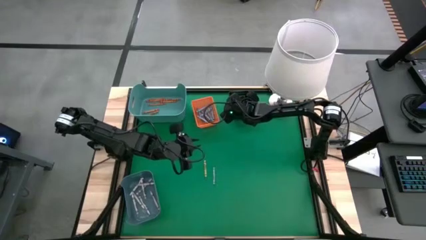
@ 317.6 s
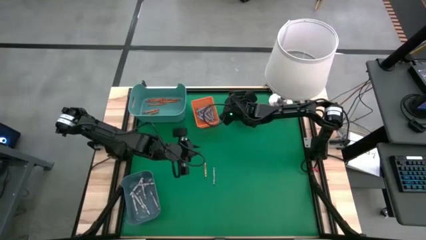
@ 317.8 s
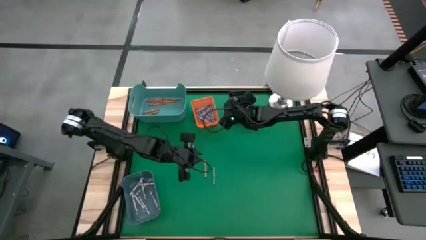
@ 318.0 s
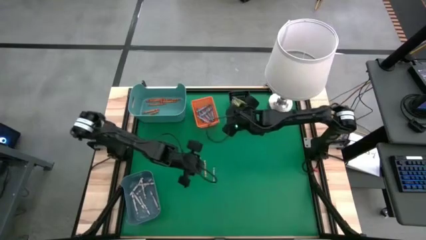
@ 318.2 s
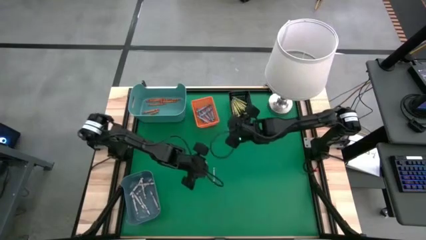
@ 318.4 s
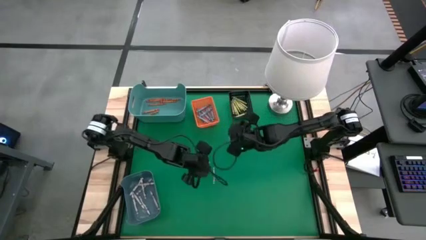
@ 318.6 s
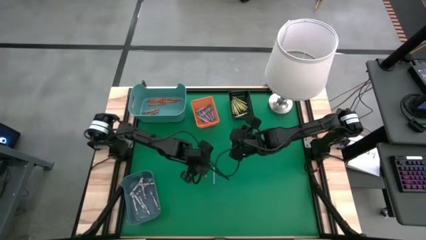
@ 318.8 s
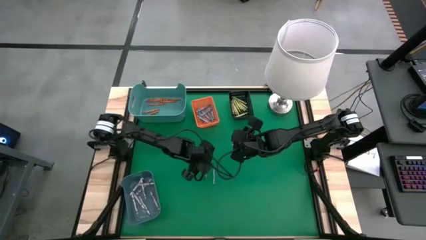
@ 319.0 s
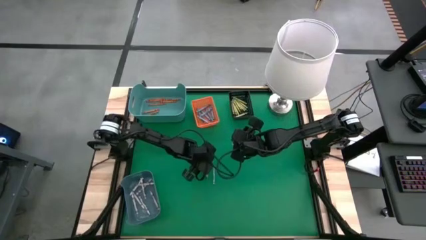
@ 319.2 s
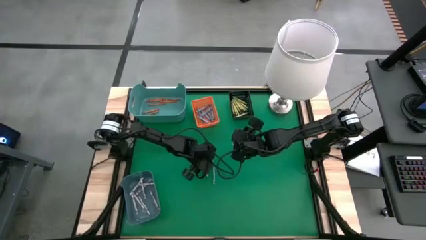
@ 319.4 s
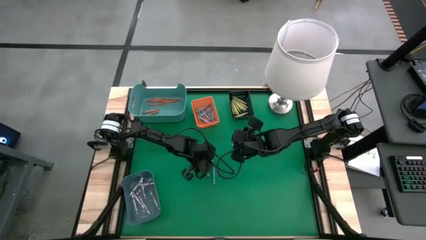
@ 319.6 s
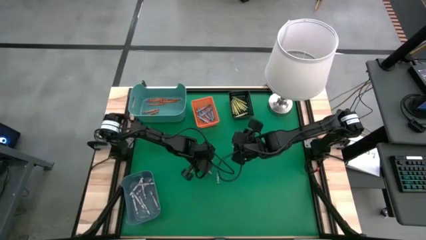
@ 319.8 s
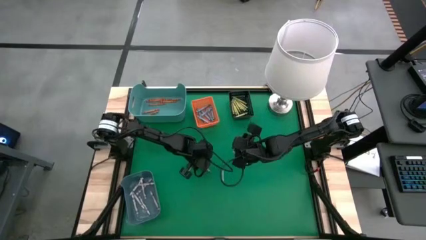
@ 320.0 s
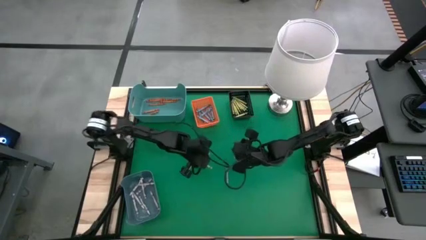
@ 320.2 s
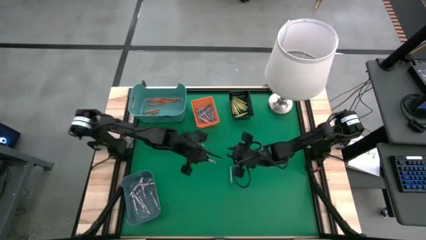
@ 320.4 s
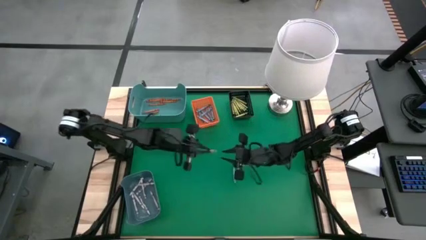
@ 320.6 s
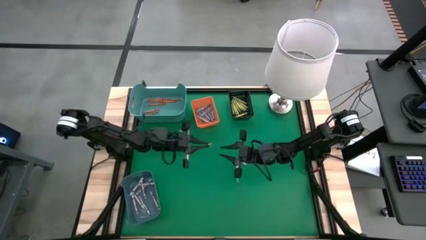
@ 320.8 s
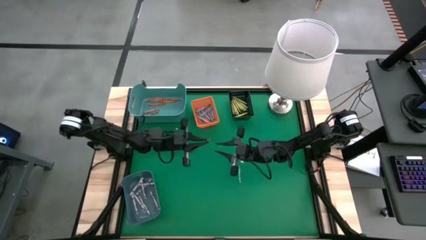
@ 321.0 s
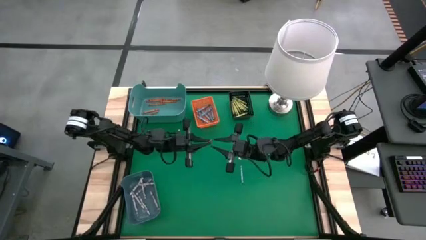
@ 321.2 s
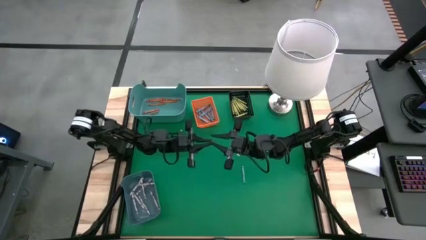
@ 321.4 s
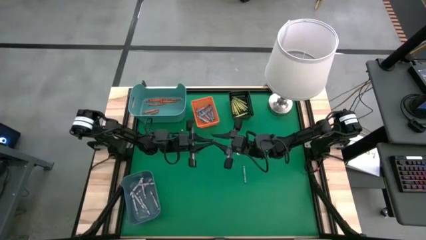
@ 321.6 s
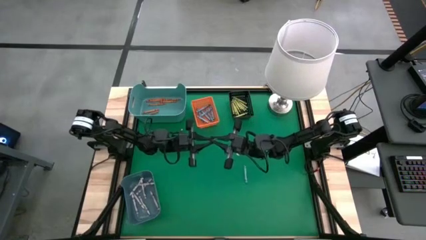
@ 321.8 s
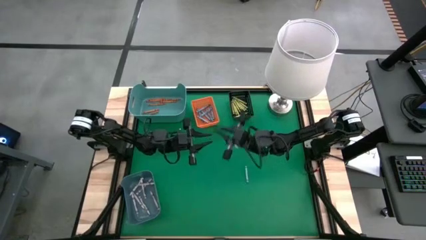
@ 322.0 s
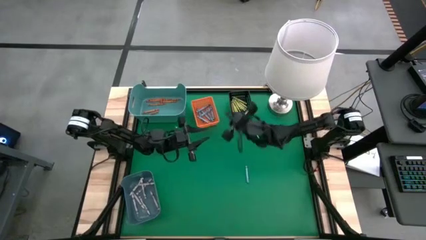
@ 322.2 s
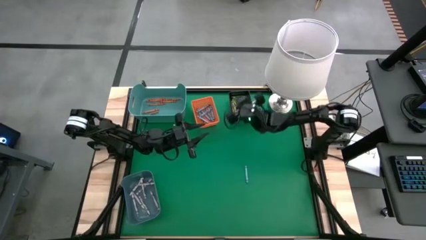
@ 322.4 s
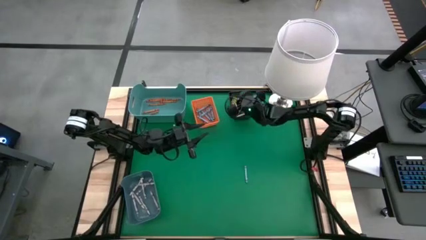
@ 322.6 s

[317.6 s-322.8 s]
Task: Sort crayons
Put the green crayon into the black bin

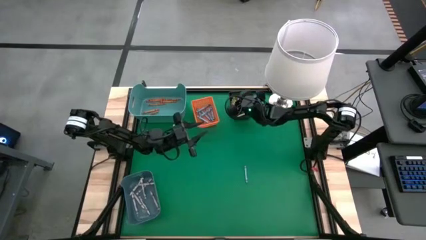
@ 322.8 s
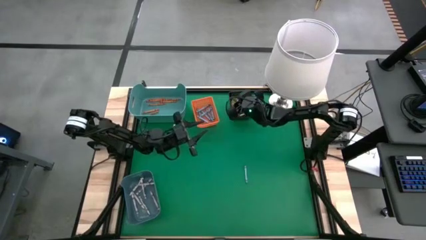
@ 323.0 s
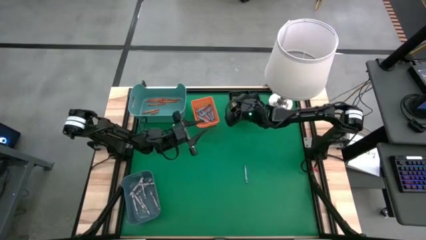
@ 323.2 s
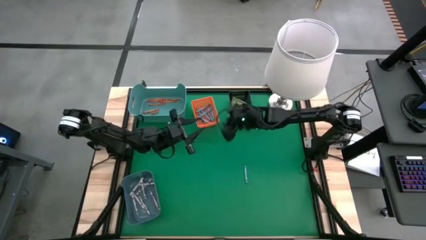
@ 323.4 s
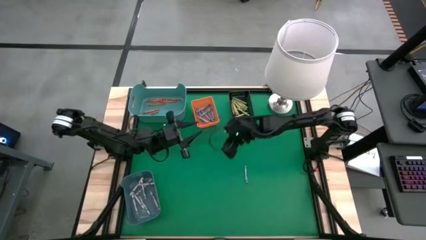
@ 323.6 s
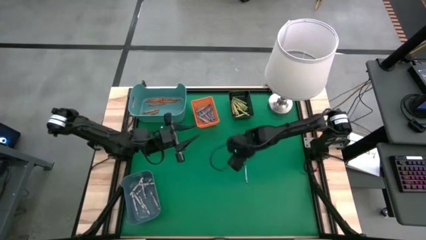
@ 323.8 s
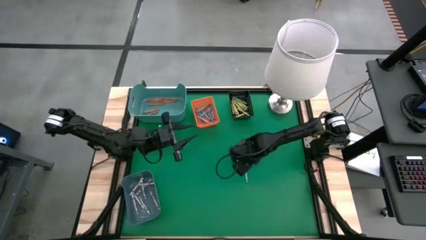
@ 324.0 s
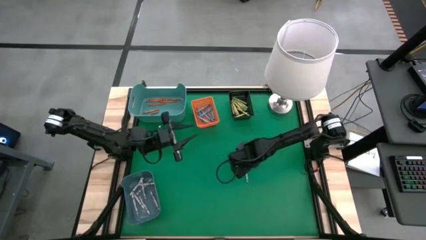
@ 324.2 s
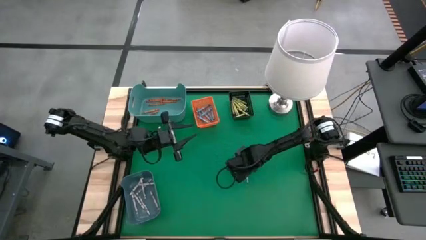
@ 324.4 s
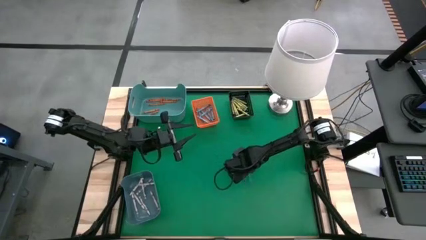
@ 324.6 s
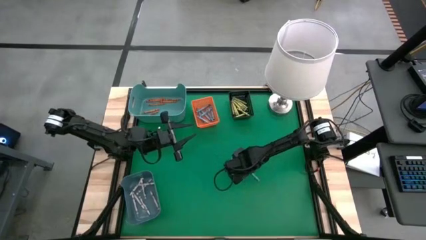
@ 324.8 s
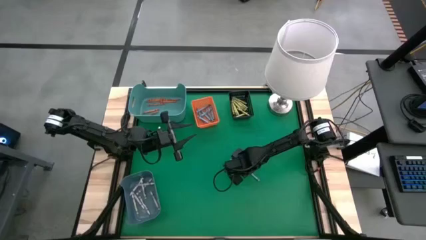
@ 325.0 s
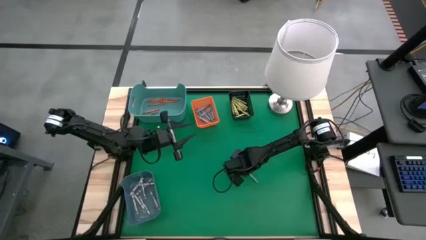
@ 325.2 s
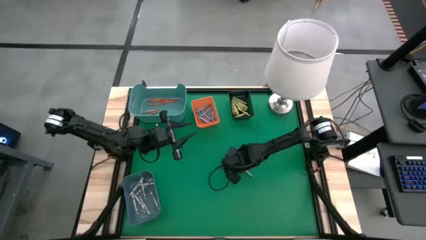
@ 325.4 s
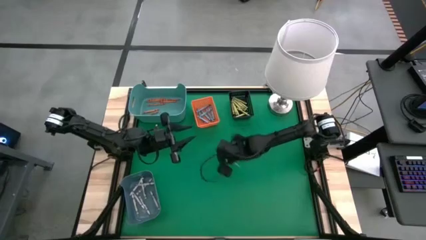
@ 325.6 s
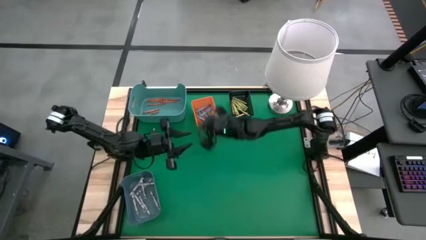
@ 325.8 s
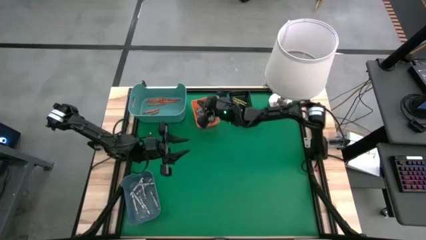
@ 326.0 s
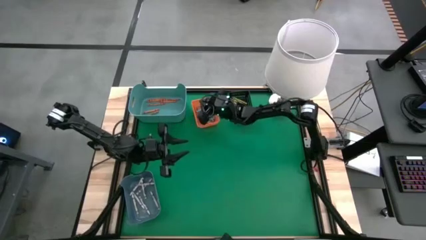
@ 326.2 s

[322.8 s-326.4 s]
Put the blue crayon into the orange bin

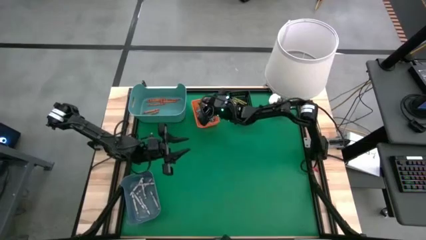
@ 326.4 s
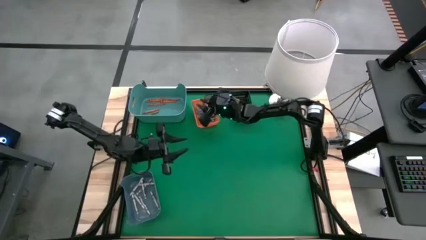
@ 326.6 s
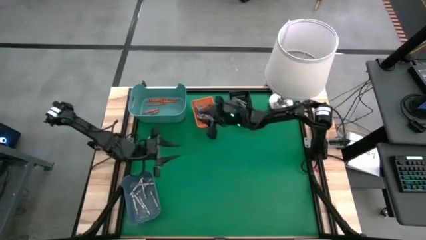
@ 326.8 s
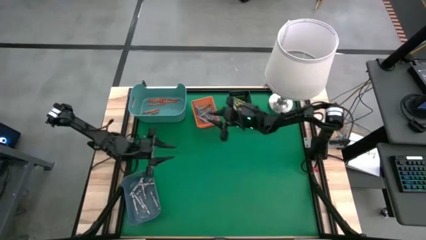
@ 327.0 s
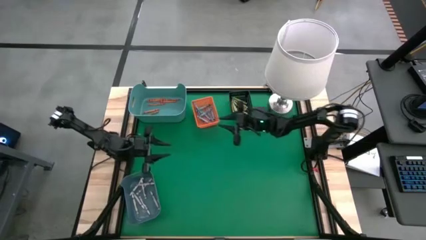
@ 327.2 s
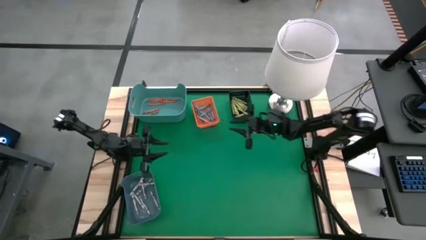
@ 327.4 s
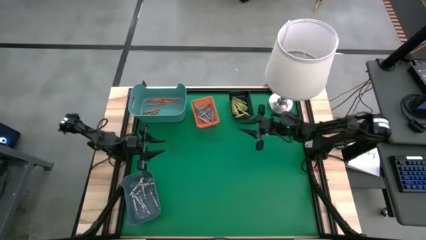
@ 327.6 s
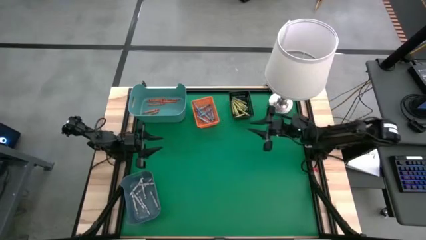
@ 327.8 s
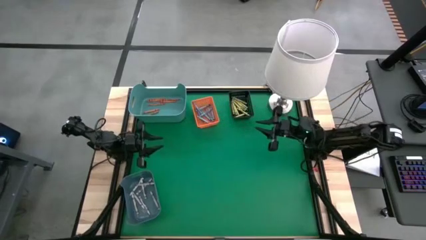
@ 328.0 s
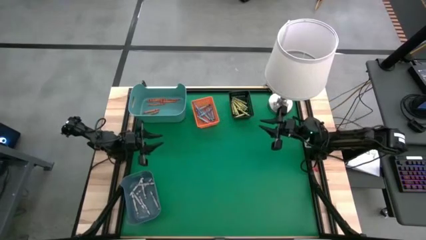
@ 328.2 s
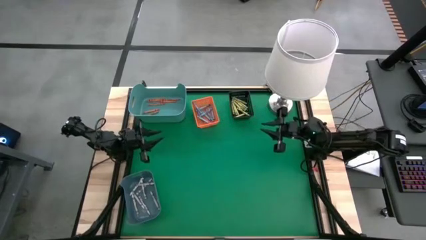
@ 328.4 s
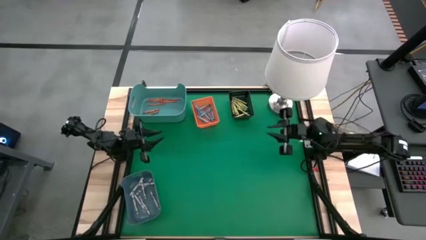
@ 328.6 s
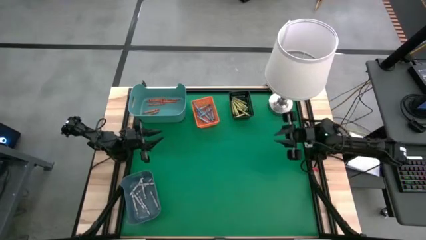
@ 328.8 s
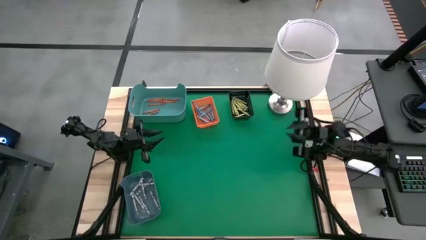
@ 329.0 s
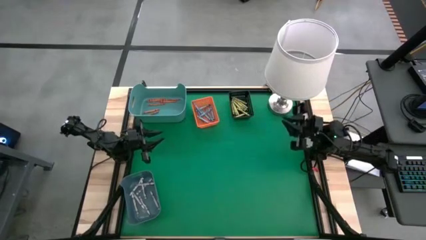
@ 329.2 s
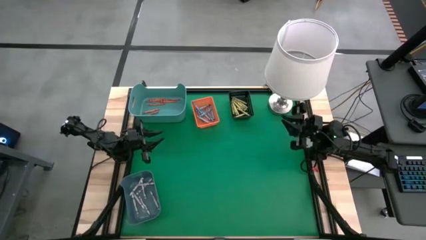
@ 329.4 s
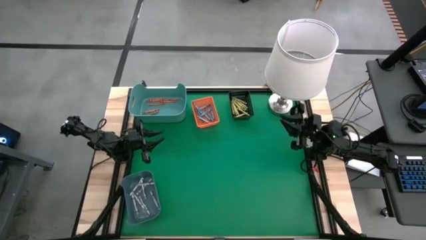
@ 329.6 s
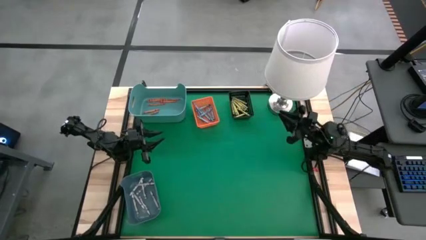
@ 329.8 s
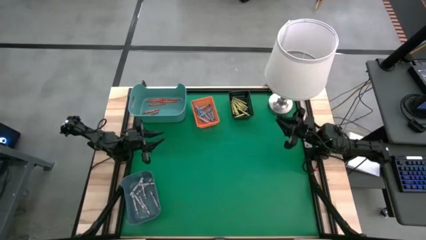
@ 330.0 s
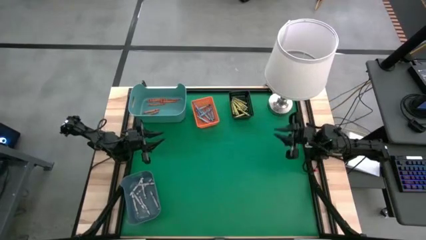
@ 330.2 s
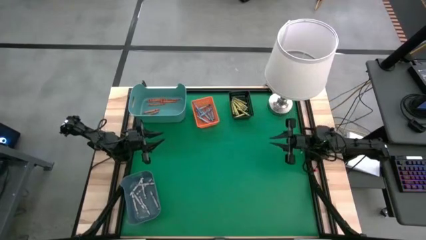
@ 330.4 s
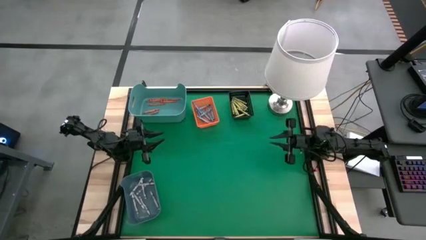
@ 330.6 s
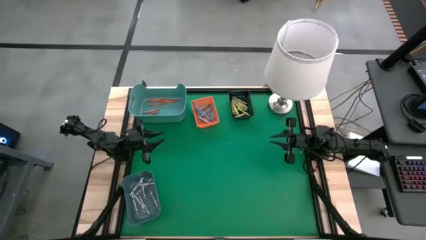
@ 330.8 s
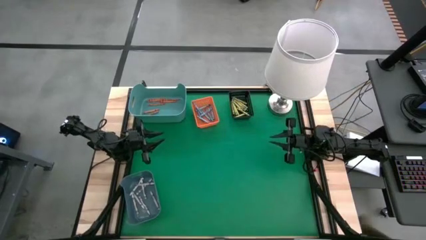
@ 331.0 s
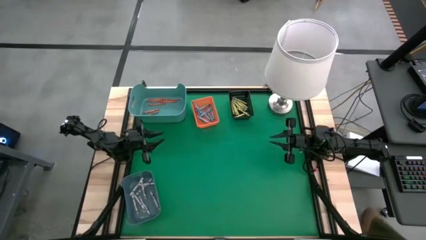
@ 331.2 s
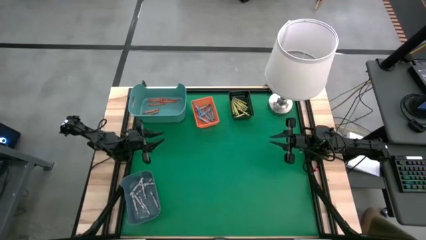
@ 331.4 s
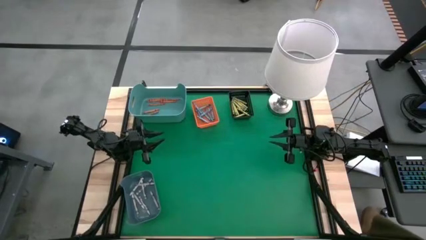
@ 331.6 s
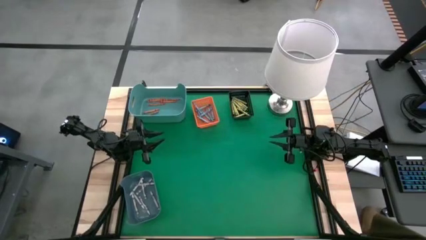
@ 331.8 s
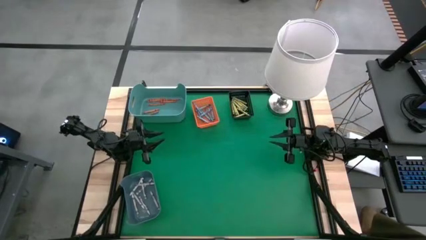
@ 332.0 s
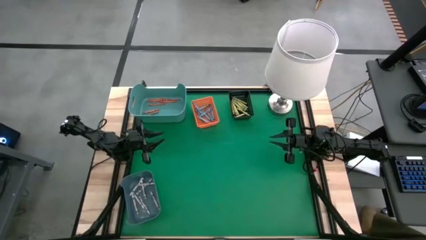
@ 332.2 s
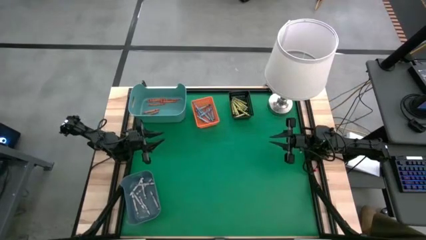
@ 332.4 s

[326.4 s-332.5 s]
Return to Home Position
